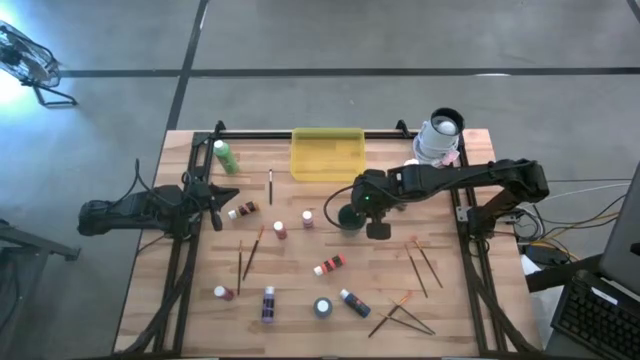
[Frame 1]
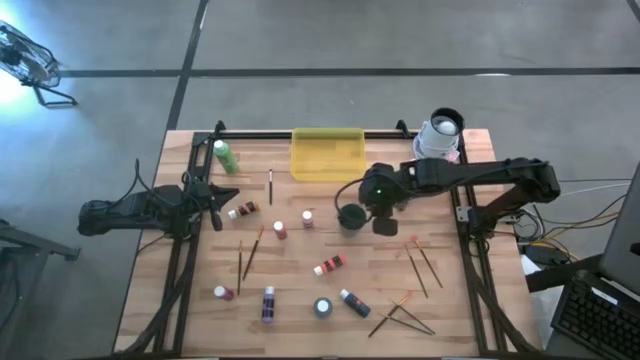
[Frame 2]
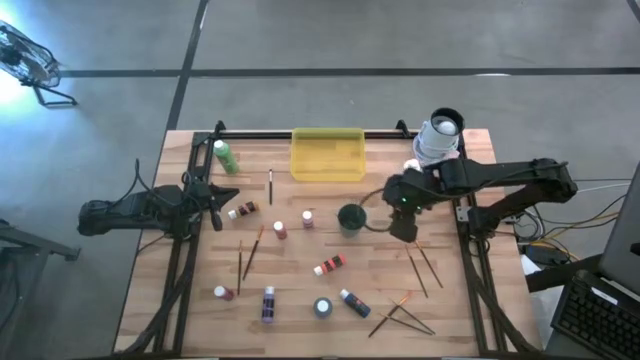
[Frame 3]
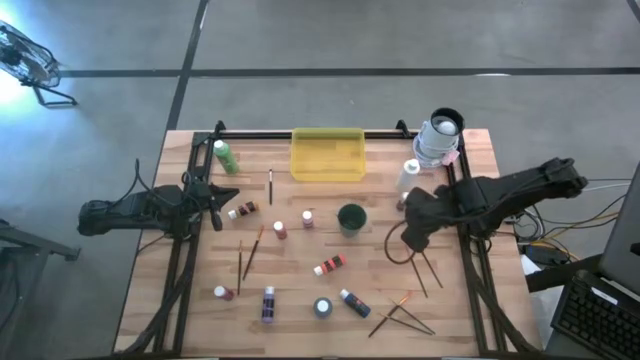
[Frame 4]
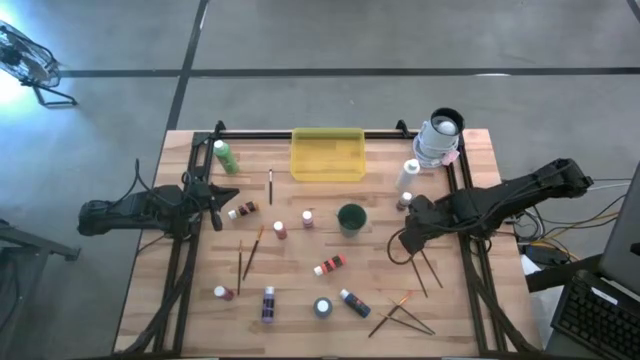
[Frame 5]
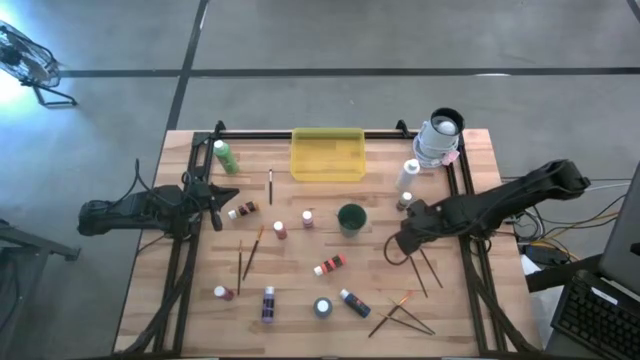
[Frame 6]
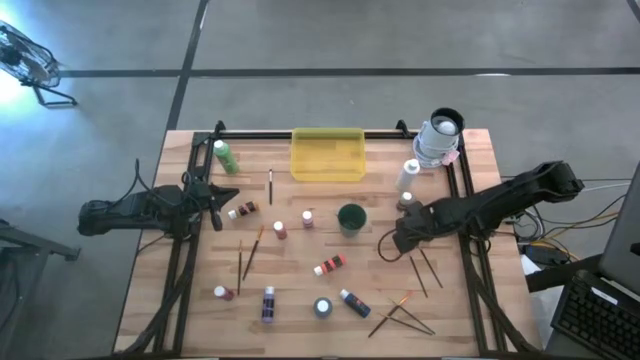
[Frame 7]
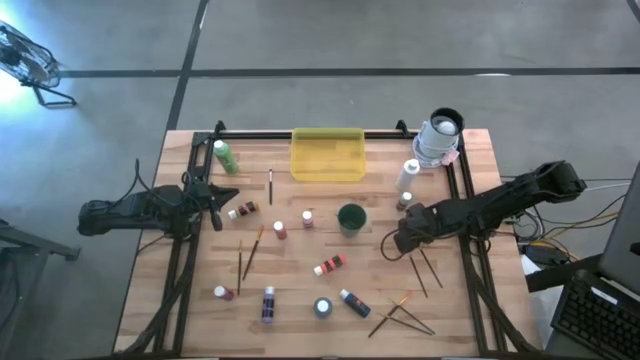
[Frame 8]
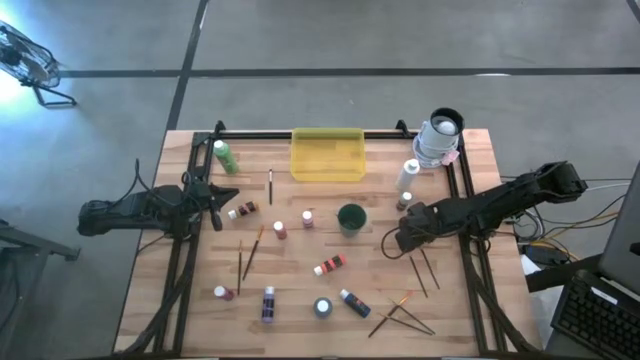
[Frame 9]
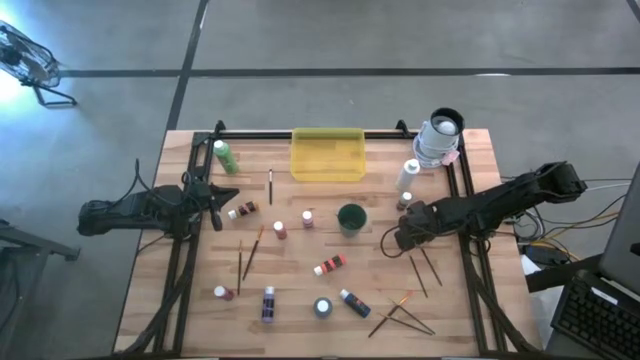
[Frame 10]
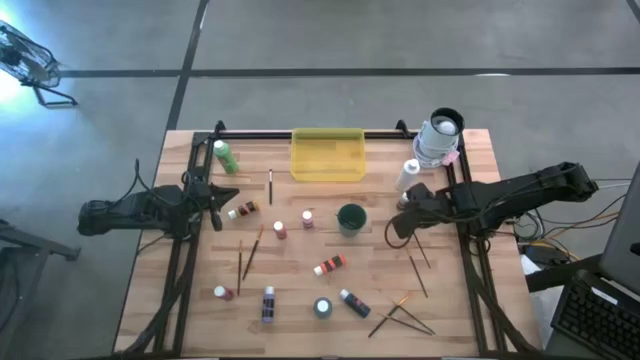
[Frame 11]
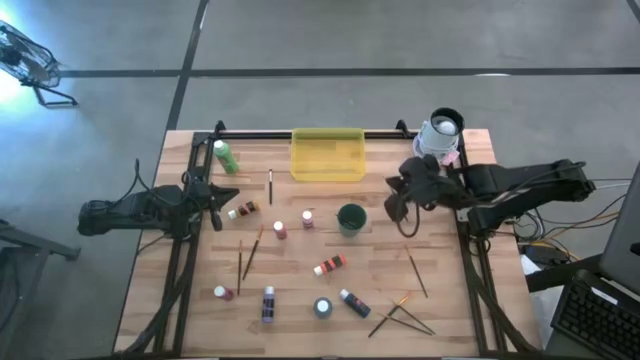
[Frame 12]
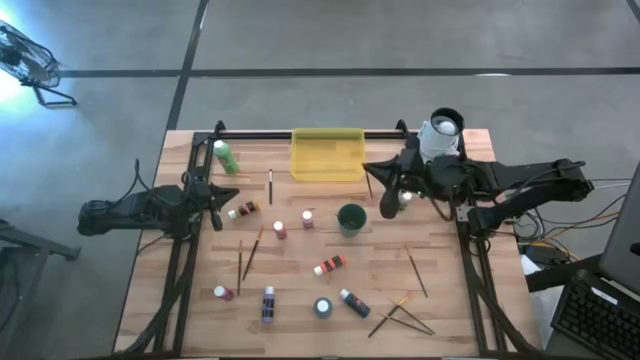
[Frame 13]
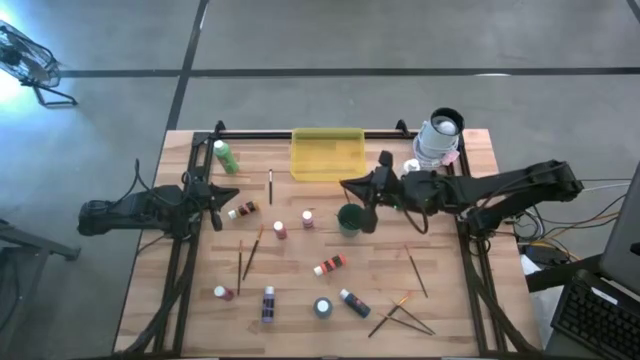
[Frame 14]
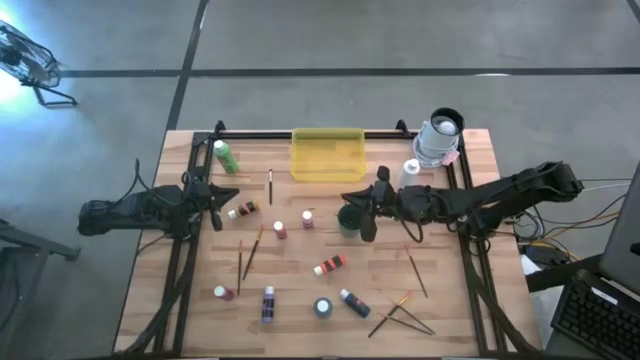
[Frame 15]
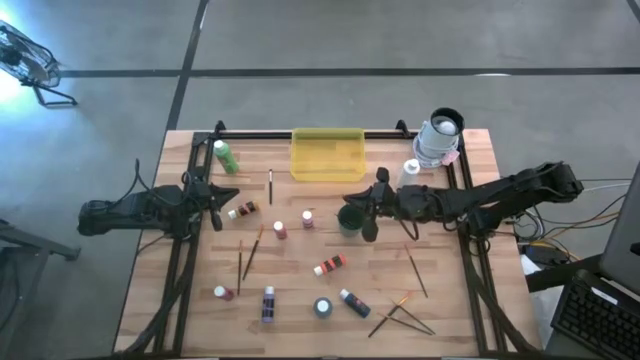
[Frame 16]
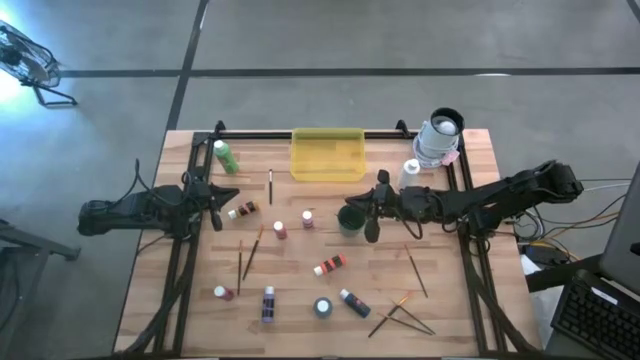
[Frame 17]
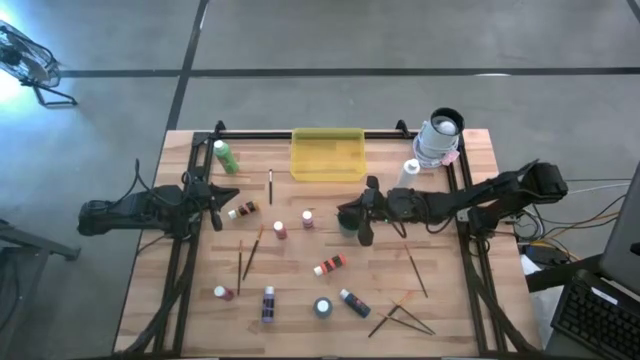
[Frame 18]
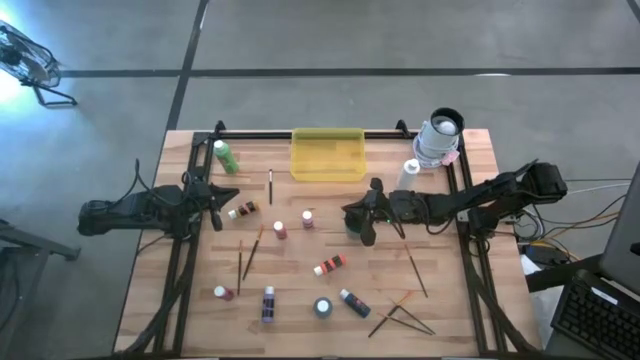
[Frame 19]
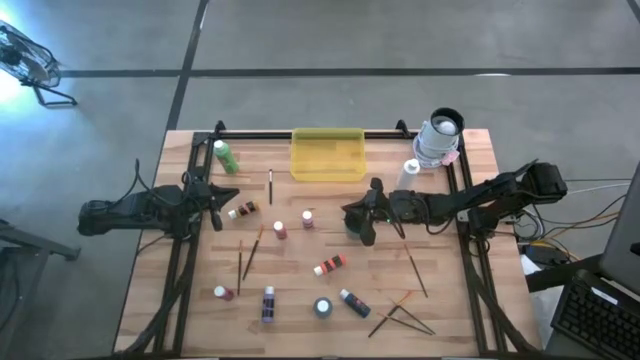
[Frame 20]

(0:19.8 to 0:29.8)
Task: Pick & Place Paint Supplies
Put the gold paint brush into the green cup

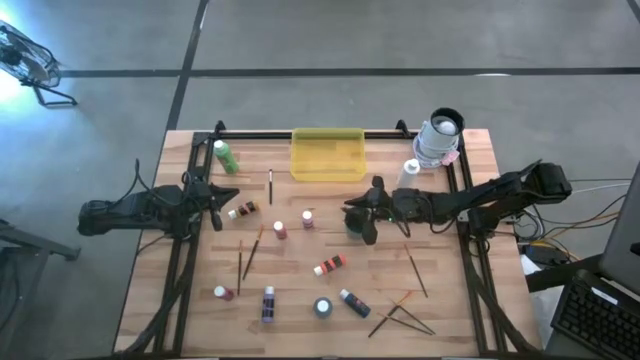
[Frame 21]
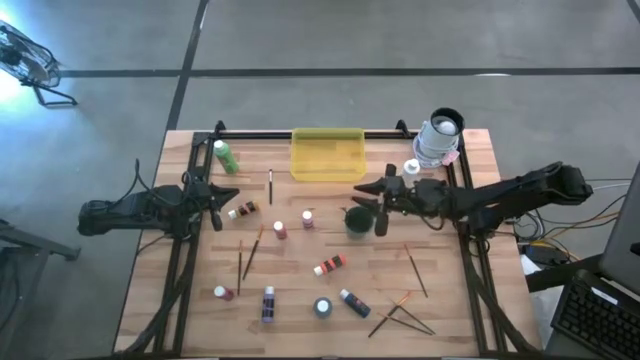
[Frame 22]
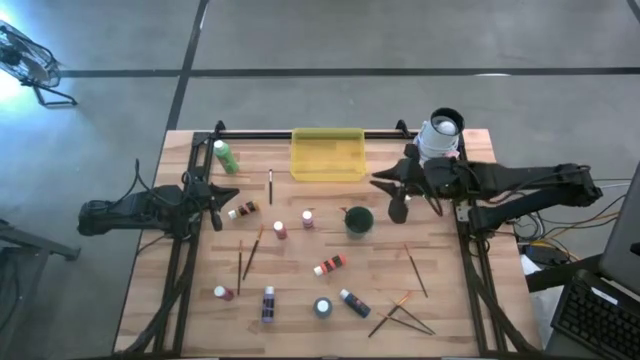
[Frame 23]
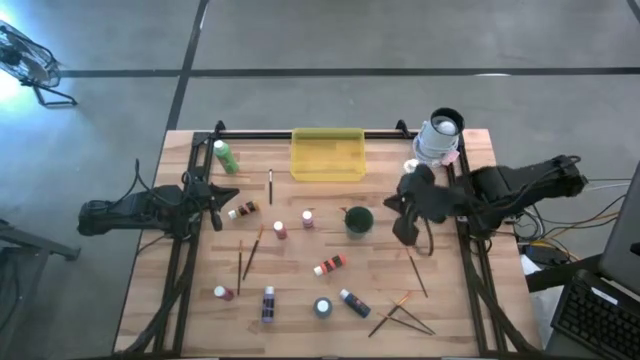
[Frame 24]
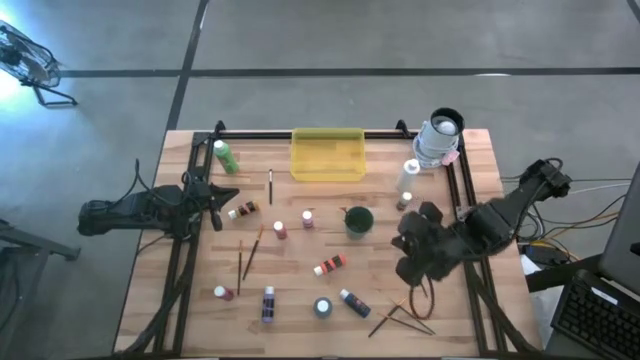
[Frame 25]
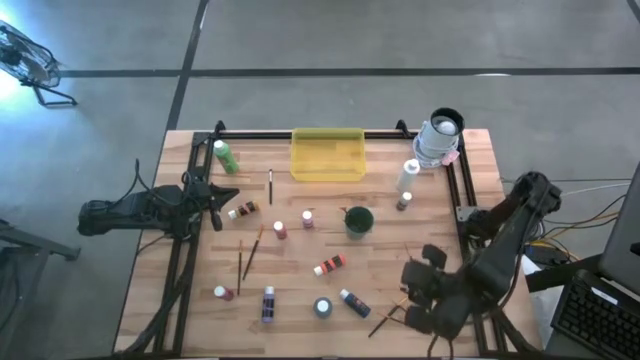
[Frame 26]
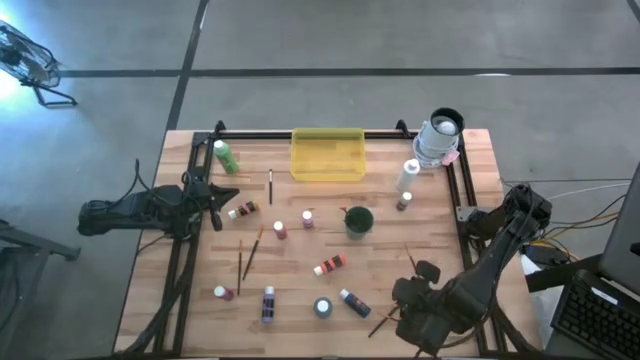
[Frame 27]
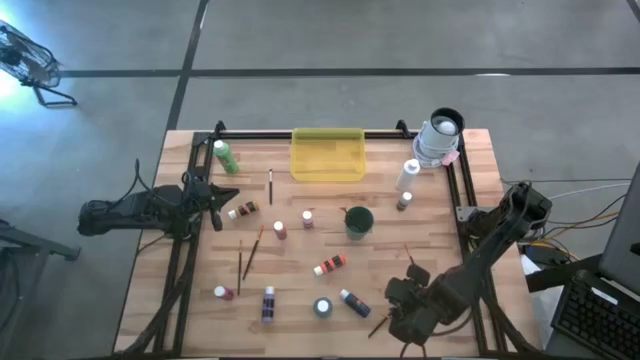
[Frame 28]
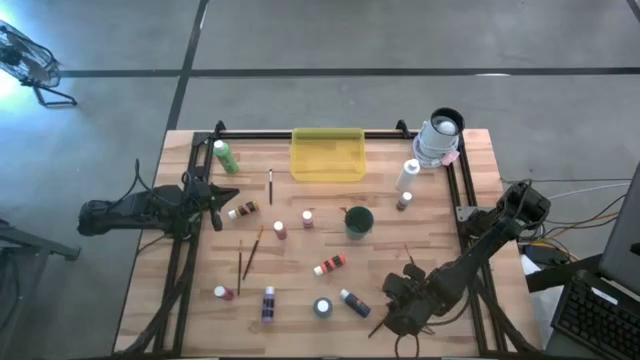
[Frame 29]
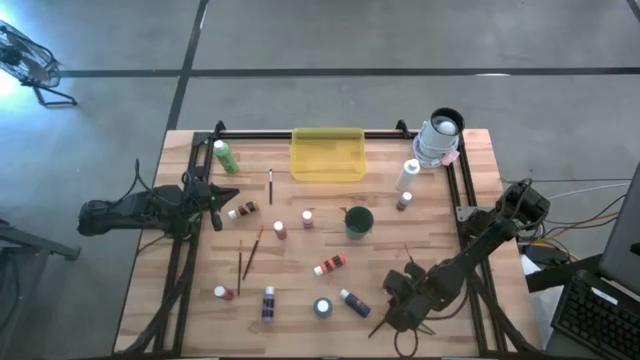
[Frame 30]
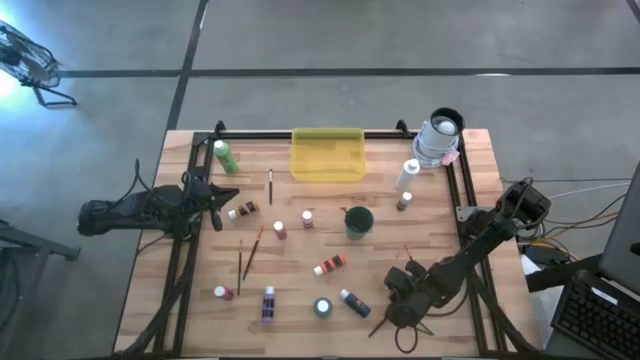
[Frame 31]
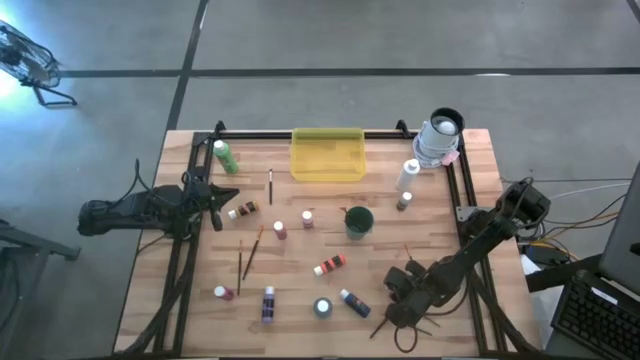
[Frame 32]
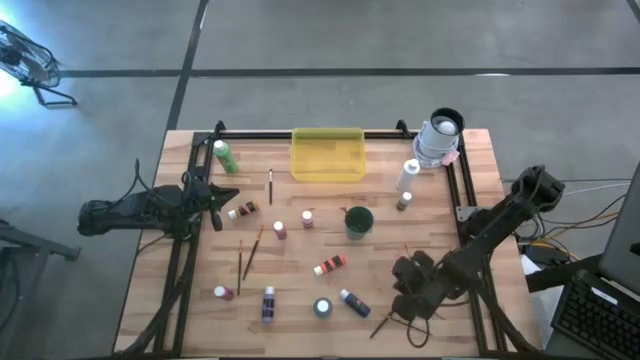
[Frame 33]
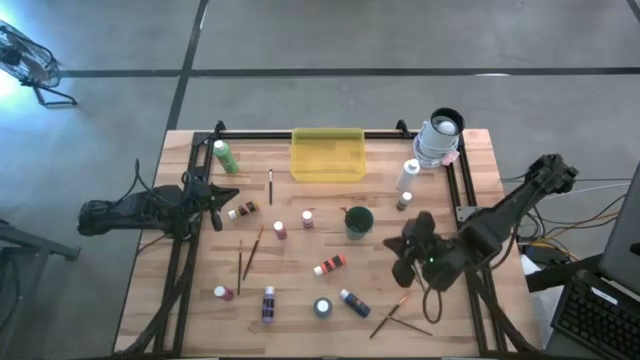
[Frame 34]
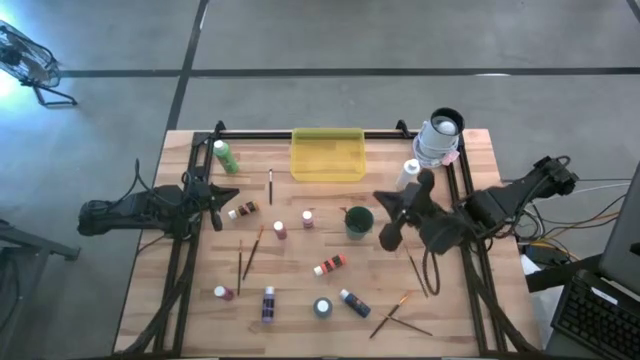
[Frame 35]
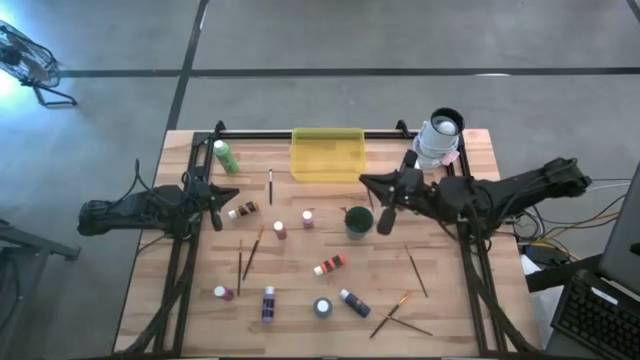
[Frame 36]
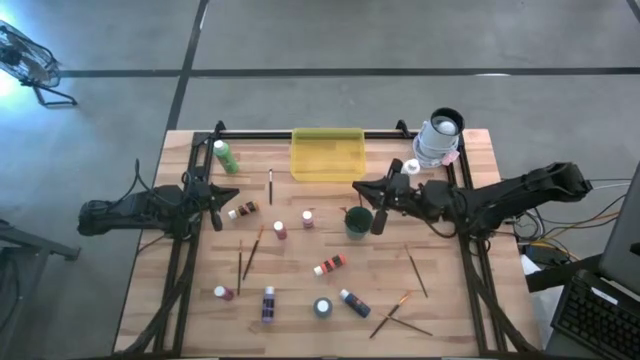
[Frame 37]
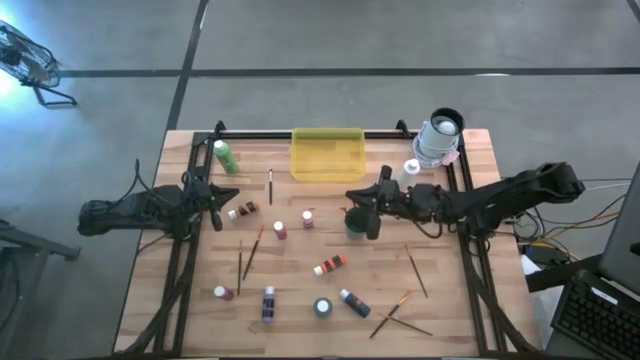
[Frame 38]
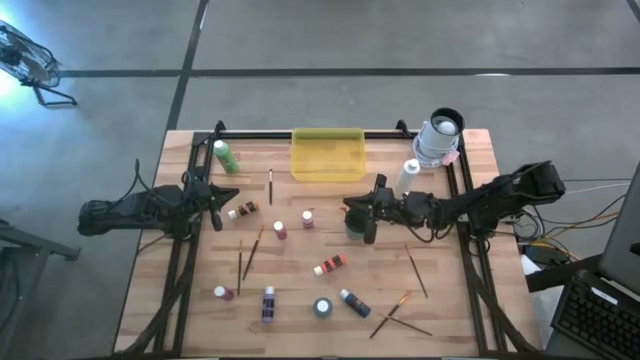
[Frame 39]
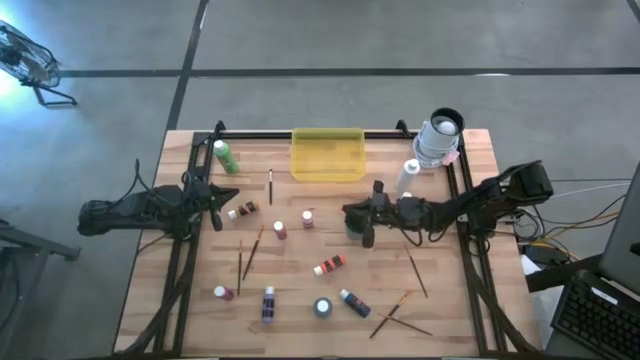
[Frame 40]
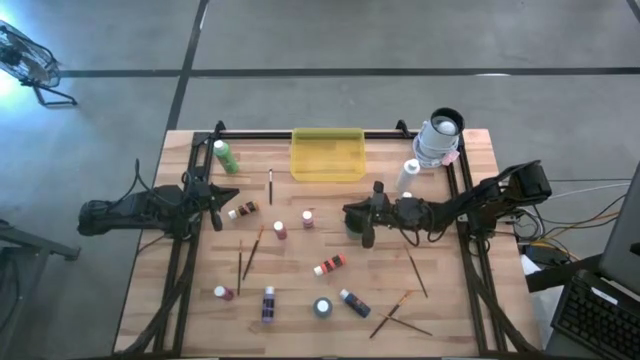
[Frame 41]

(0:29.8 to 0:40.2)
Put the gold paint brush into the green cup

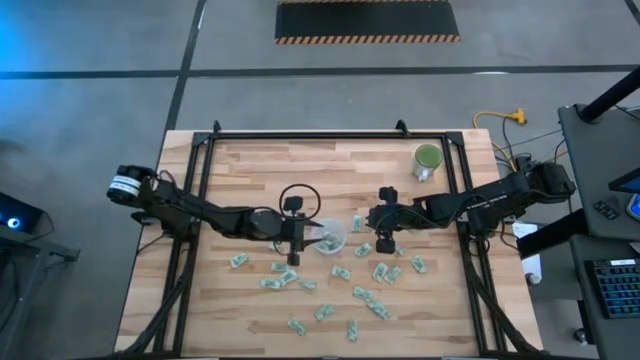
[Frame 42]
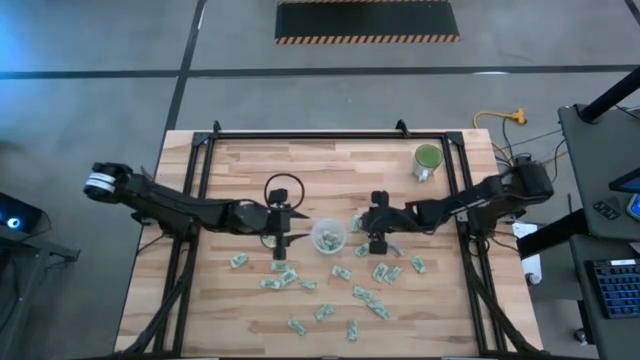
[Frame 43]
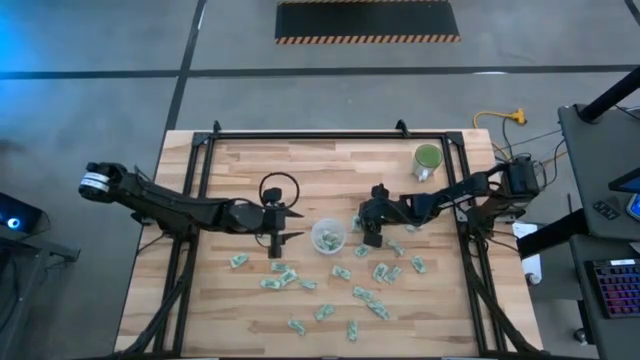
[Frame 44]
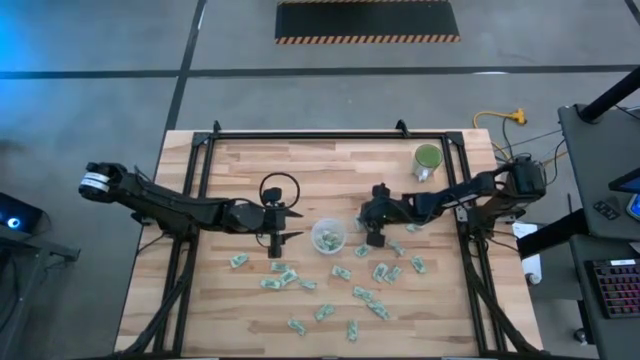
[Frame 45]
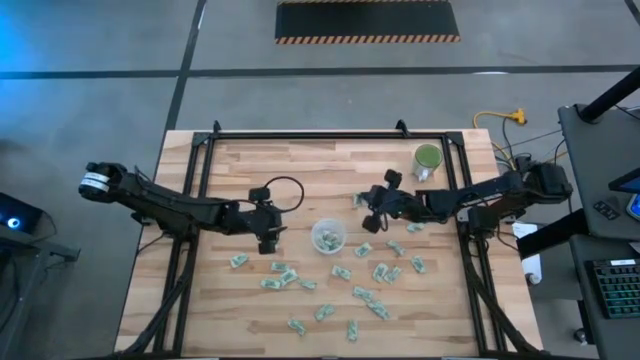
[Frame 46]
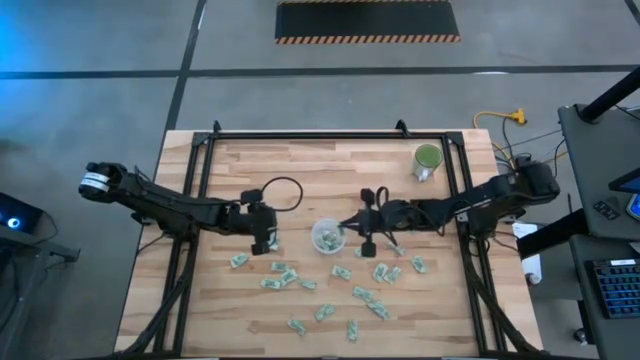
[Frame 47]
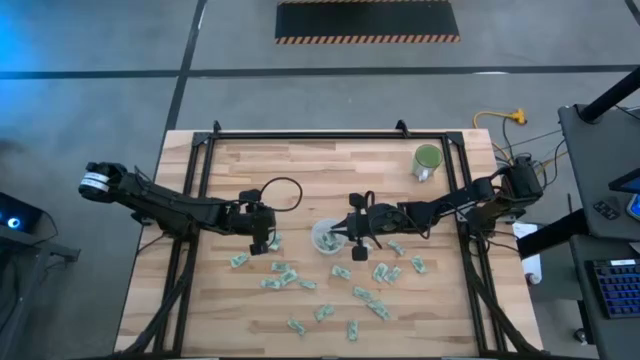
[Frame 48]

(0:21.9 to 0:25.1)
Task: Pick and place Stevia / Truvia into bins
Put the light green stevia packet into the transparent container
